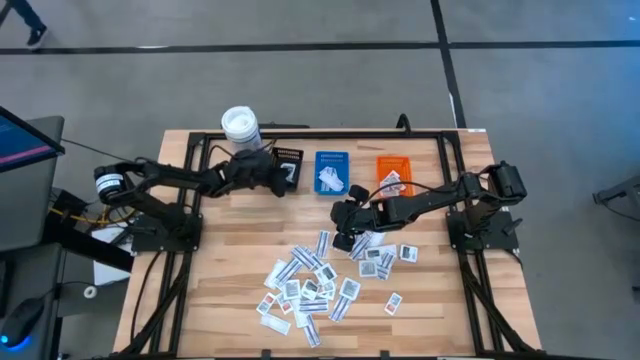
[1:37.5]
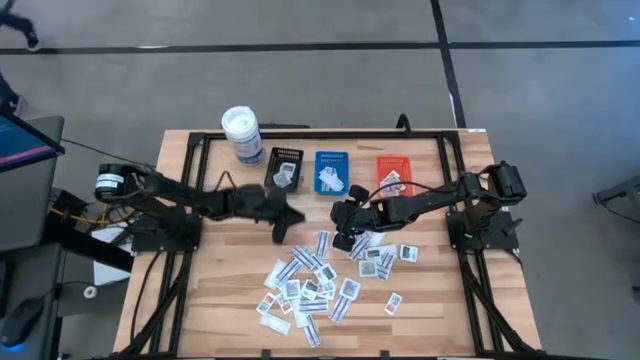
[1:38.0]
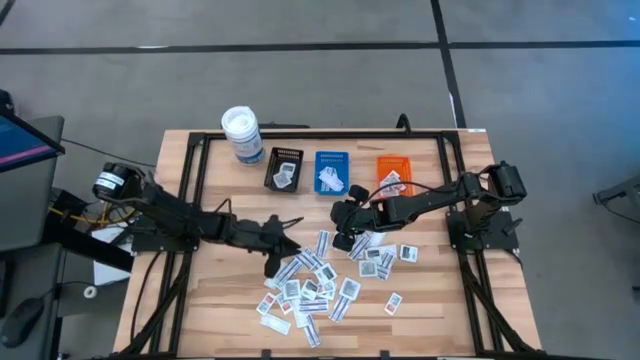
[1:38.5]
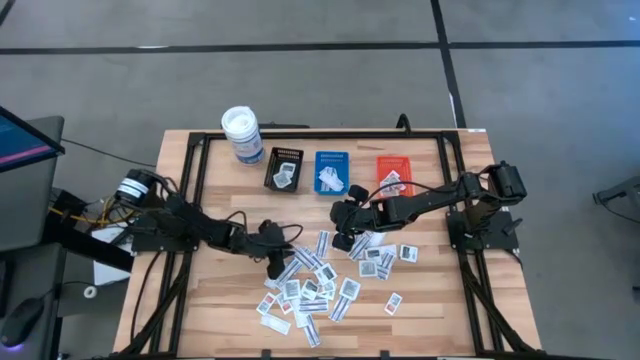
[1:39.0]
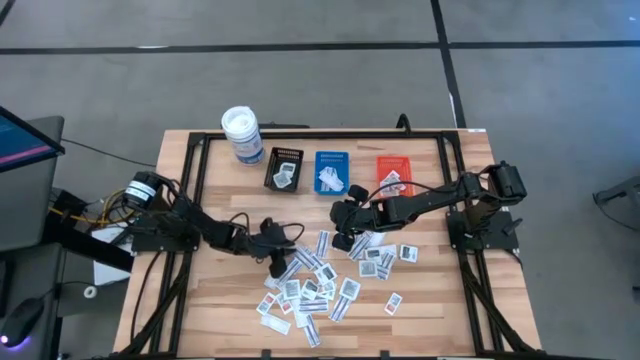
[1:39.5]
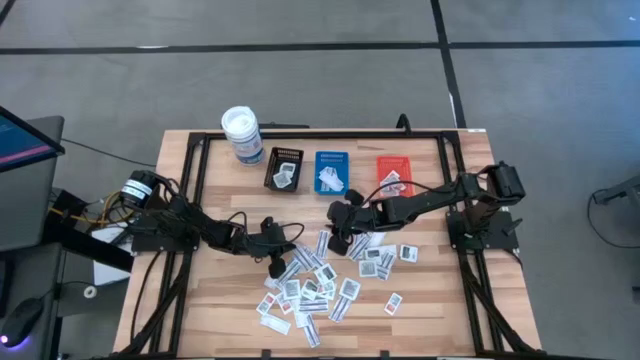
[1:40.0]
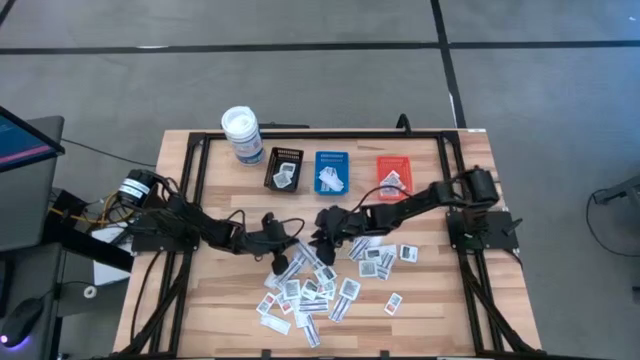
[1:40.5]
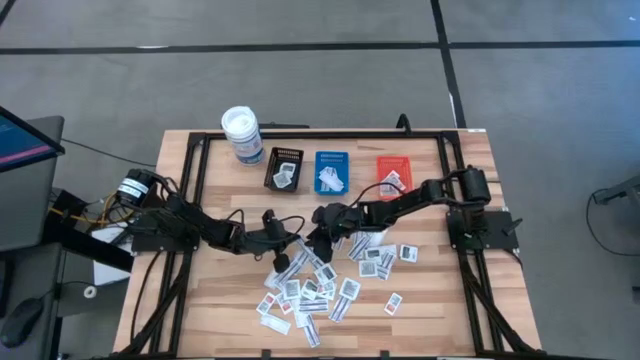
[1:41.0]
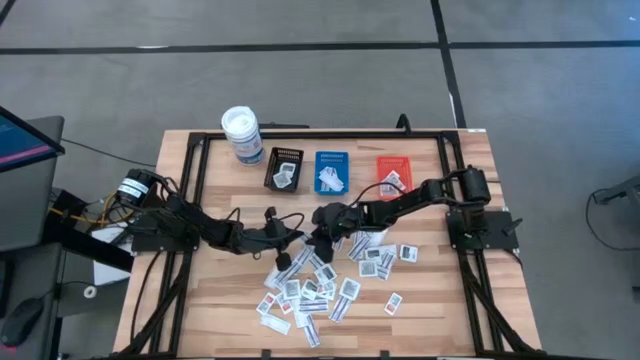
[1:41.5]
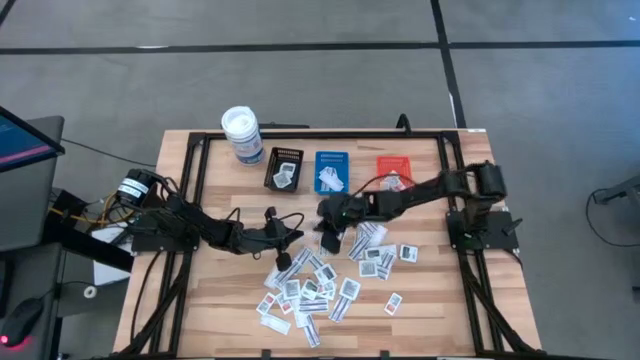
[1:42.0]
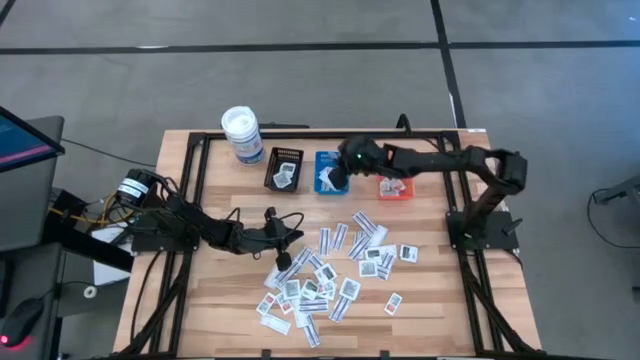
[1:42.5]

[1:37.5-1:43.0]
Task: Pick & Place First Aid Supplies
Put the blue bandage into the blue bin

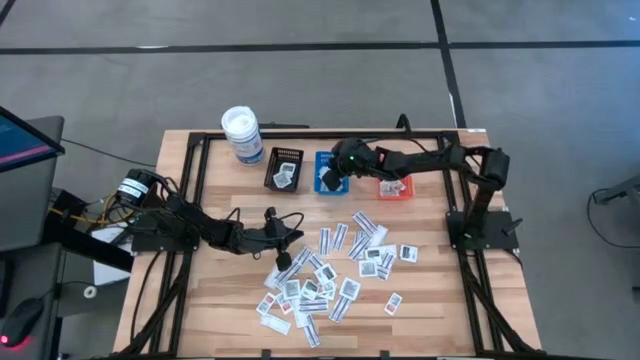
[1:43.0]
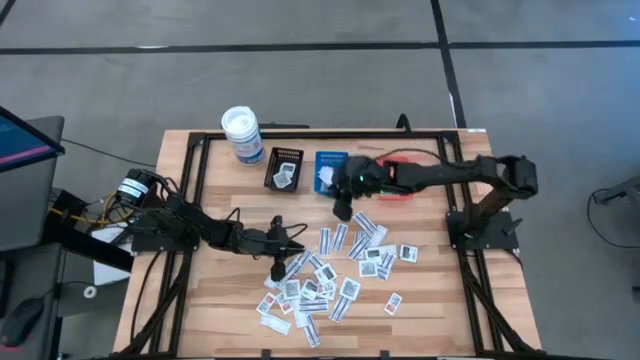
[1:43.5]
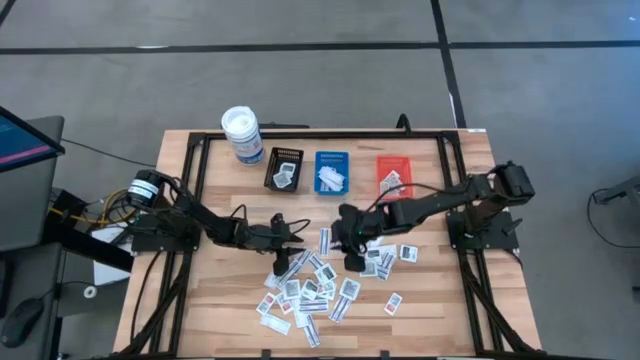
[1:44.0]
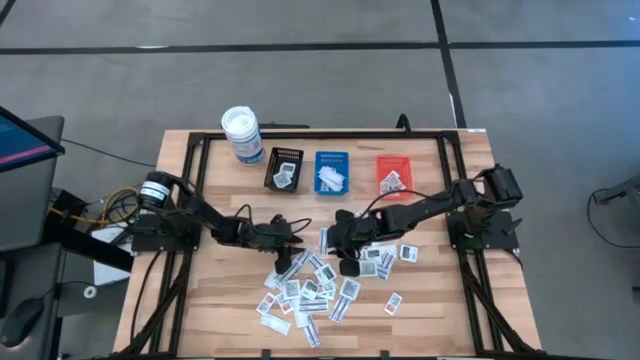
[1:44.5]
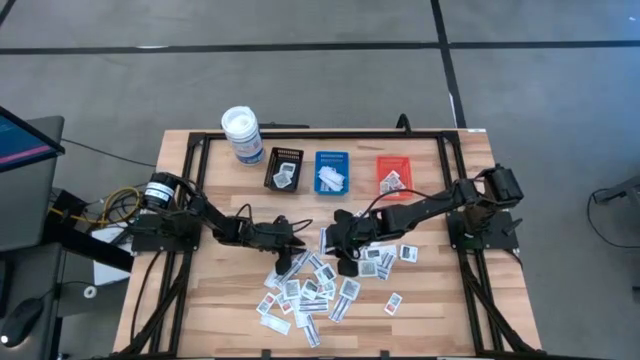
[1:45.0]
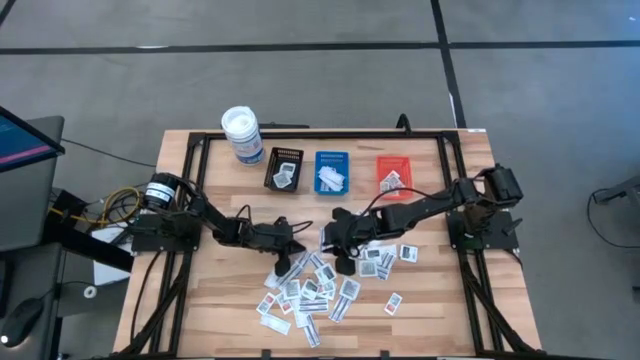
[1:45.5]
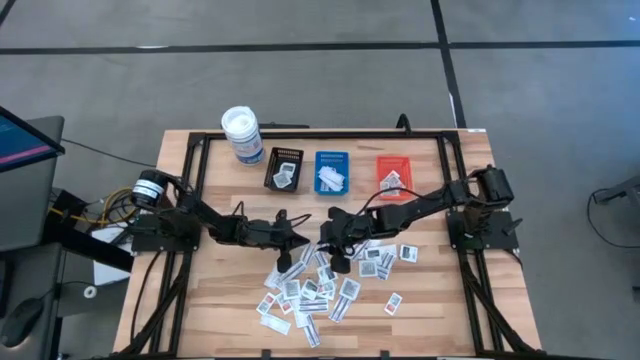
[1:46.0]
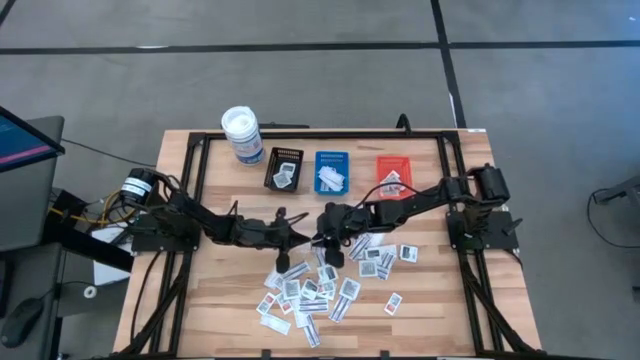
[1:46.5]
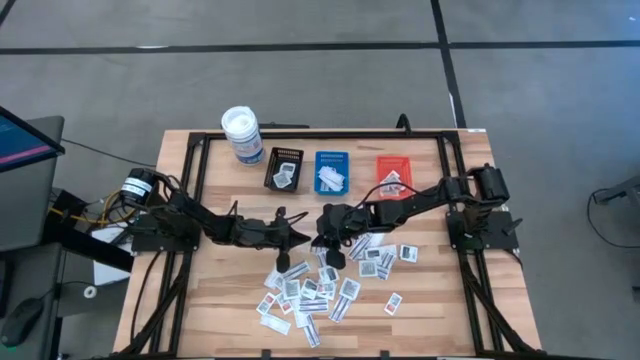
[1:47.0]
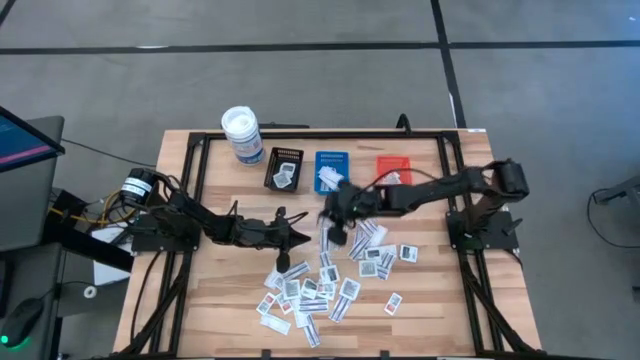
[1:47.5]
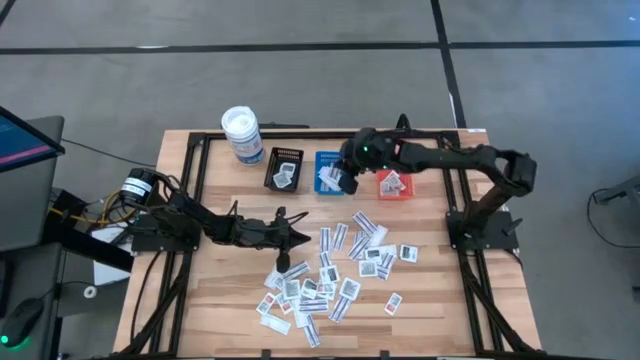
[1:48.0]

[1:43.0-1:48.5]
Put the blue bandage into the blue bin

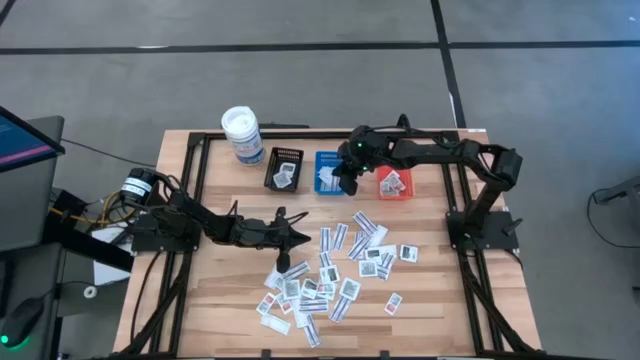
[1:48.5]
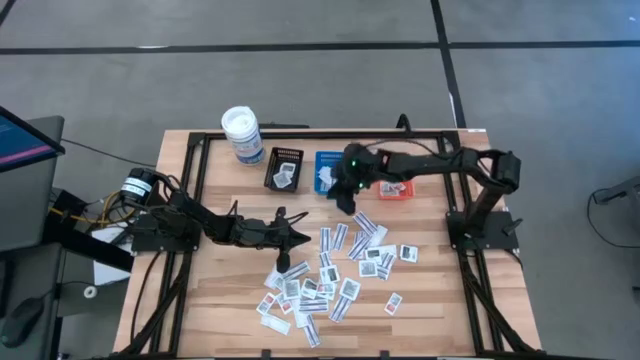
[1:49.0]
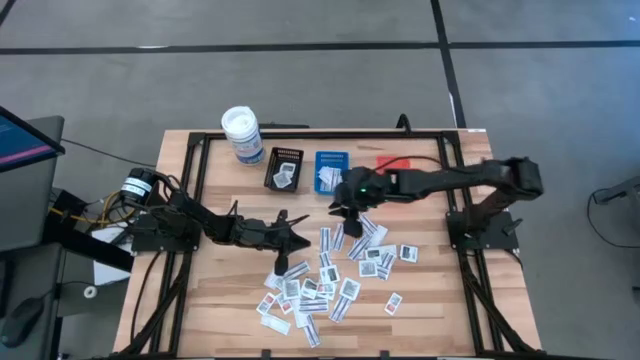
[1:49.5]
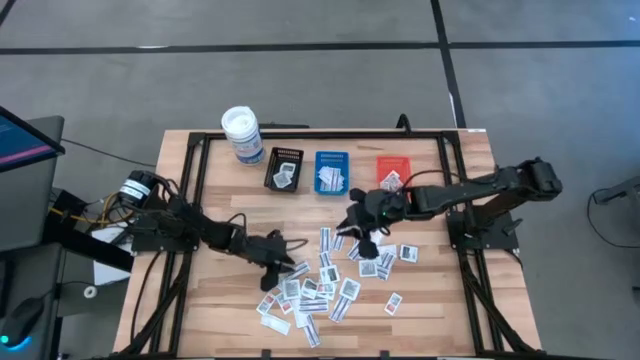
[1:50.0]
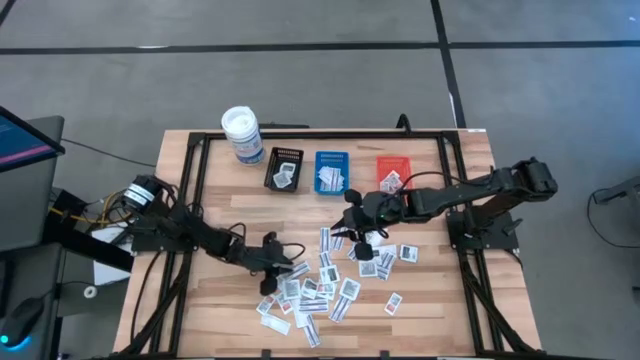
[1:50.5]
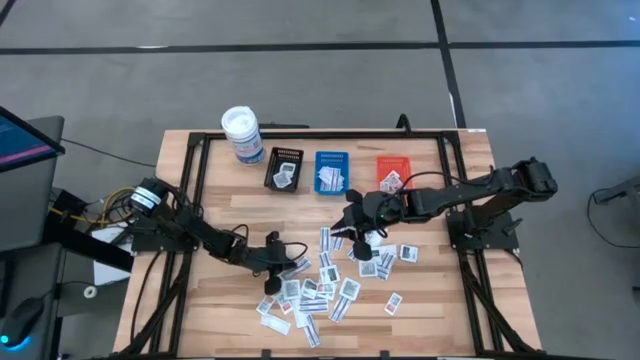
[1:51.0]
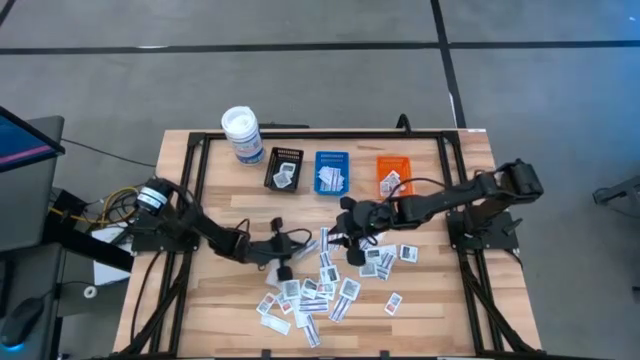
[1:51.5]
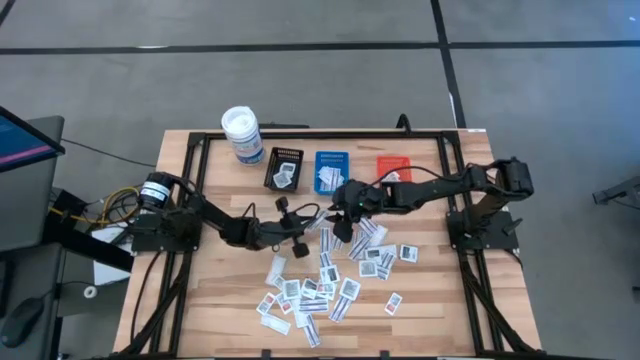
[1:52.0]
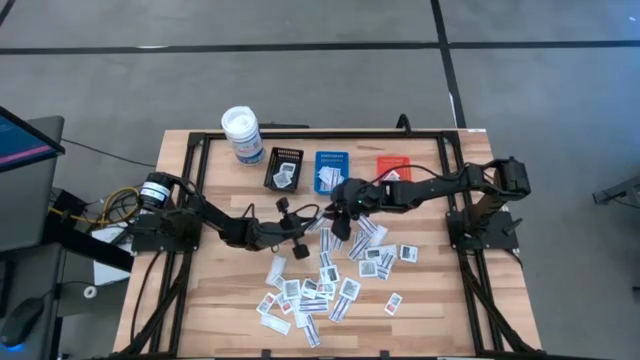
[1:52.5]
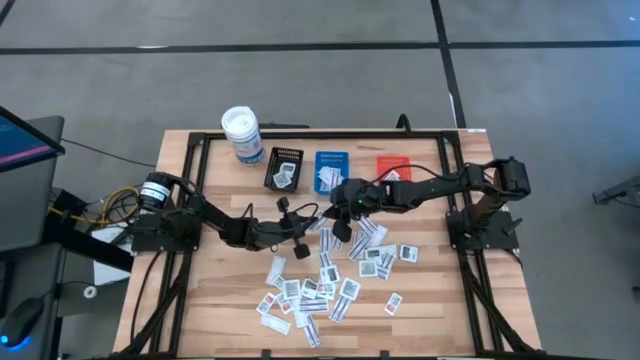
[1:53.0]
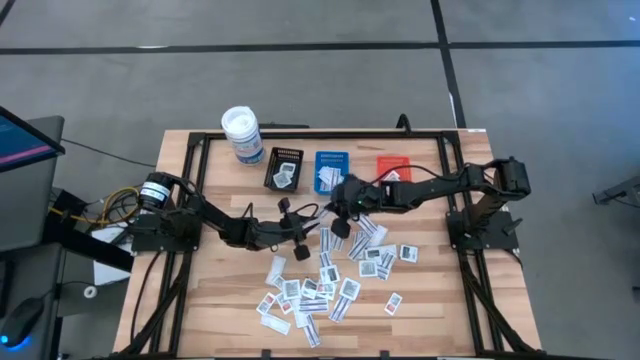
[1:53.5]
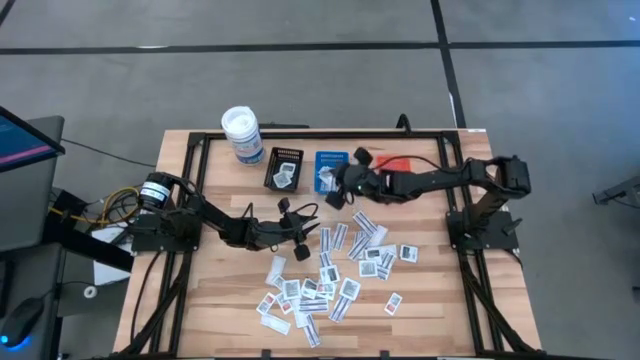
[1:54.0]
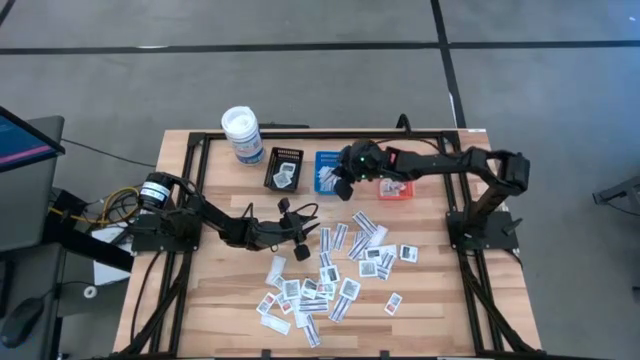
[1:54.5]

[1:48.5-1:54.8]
Put the blue bandage into the blue bin

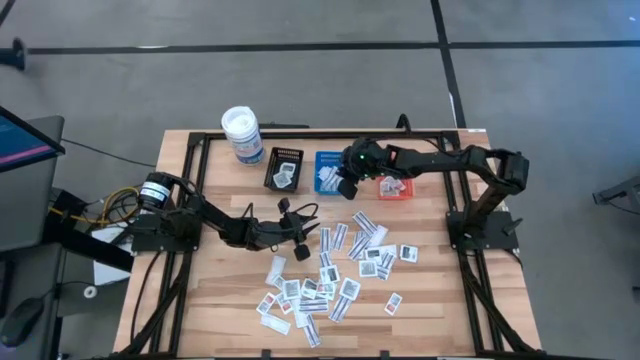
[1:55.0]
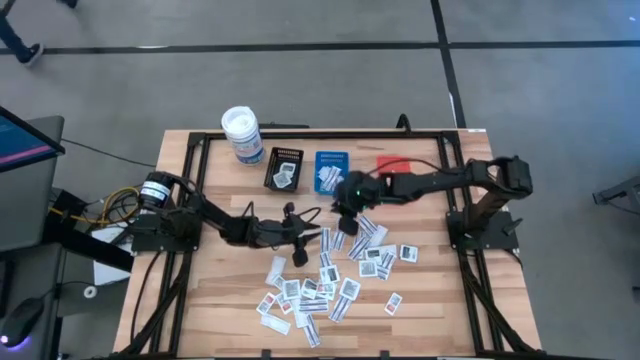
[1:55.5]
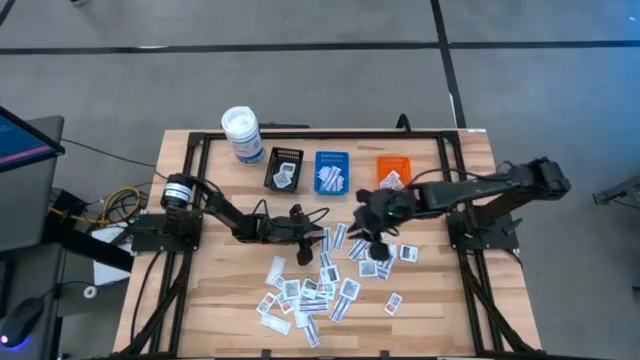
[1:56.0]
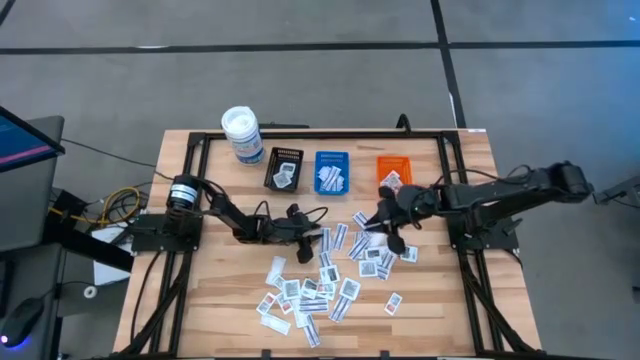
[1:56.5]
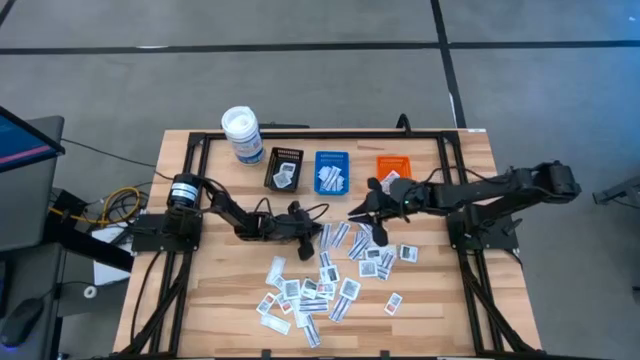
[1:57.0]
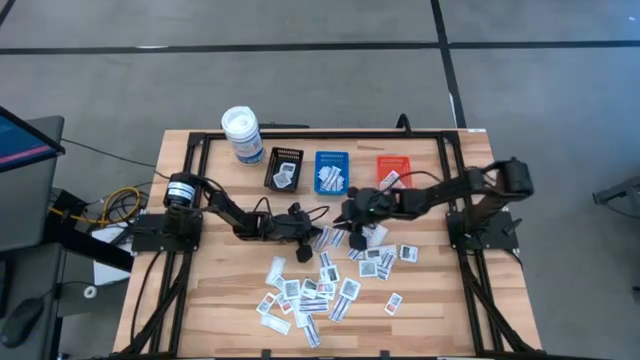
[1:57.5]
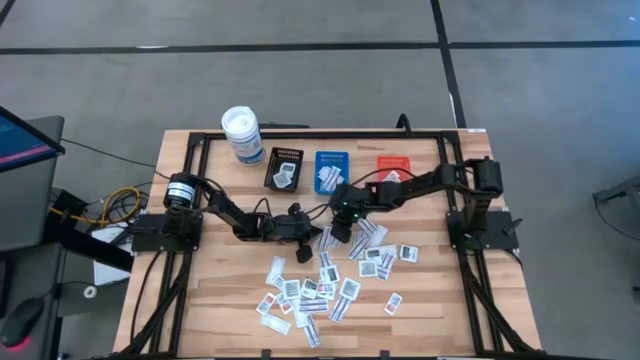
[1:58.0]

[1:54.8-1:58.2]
Put the blue bandage into the blue bin
